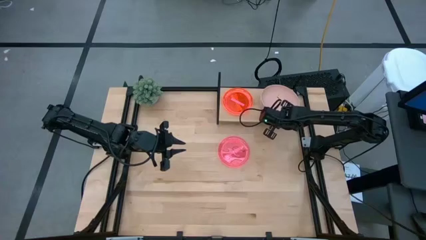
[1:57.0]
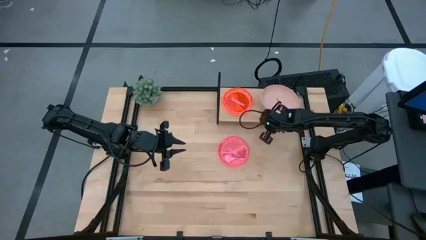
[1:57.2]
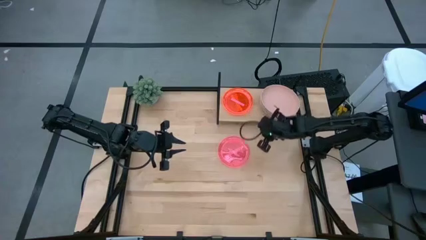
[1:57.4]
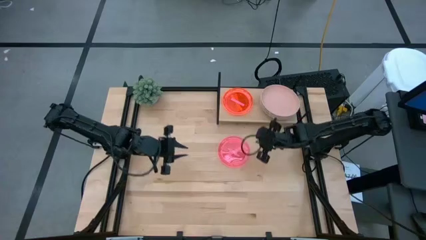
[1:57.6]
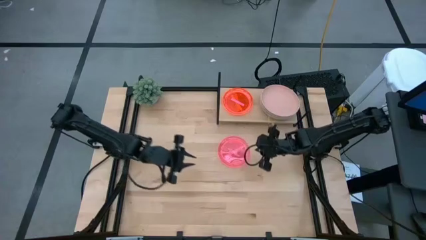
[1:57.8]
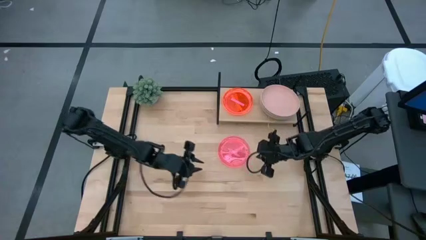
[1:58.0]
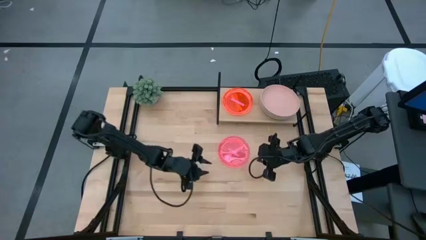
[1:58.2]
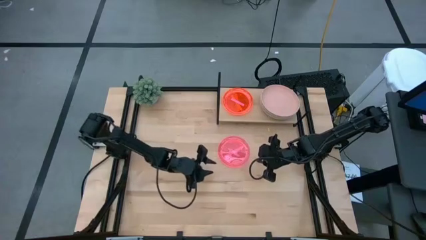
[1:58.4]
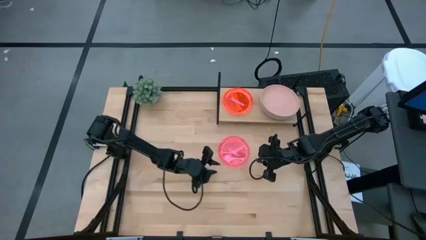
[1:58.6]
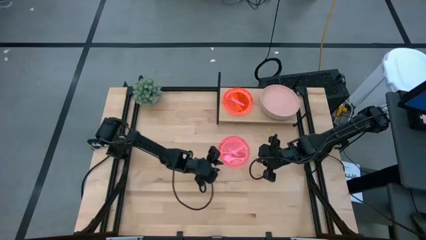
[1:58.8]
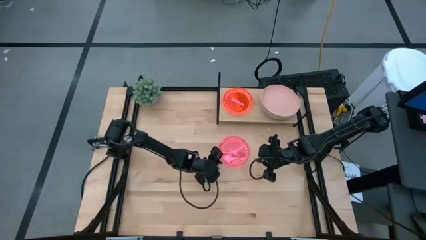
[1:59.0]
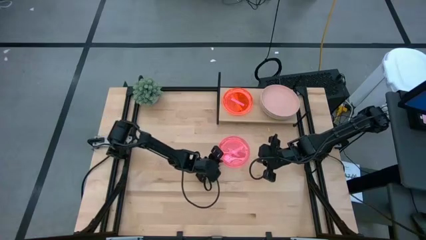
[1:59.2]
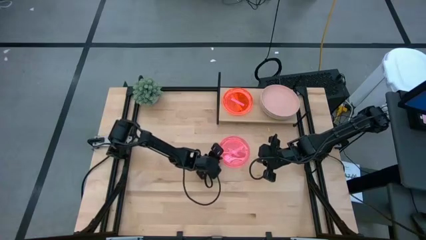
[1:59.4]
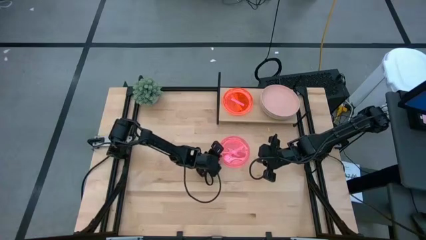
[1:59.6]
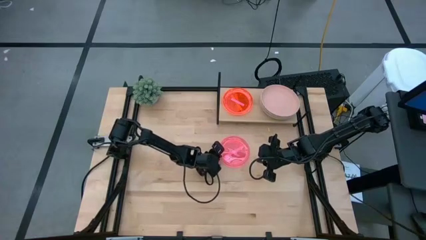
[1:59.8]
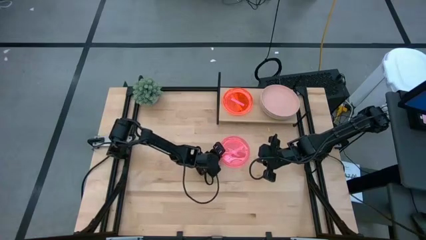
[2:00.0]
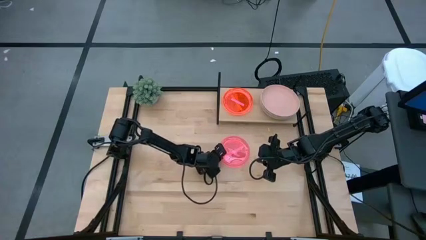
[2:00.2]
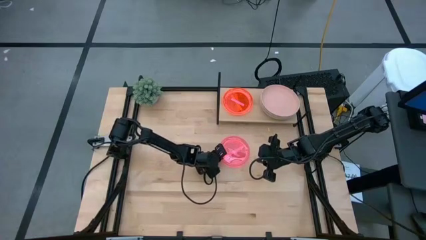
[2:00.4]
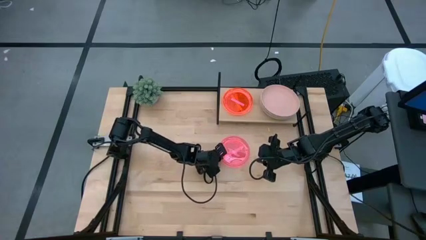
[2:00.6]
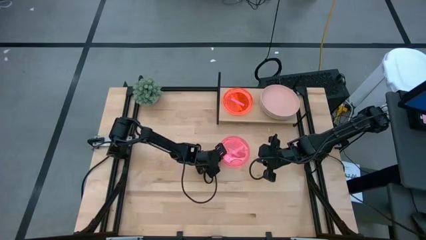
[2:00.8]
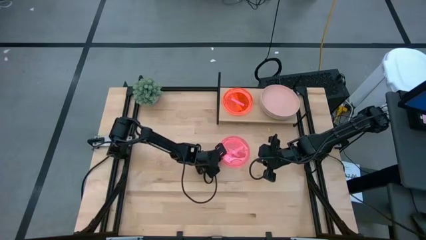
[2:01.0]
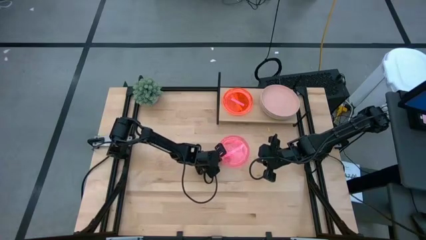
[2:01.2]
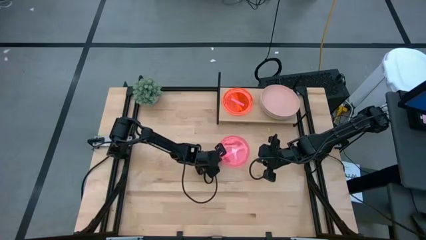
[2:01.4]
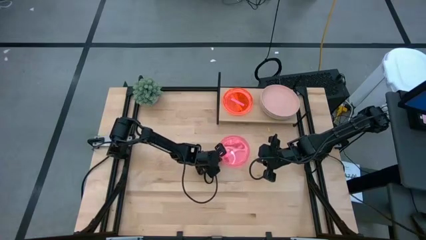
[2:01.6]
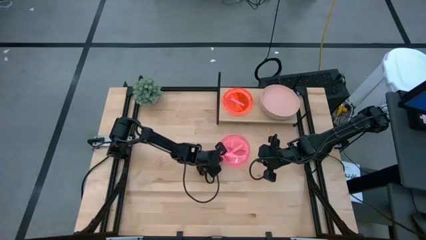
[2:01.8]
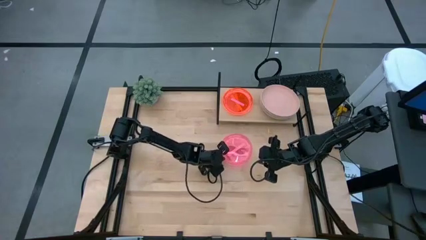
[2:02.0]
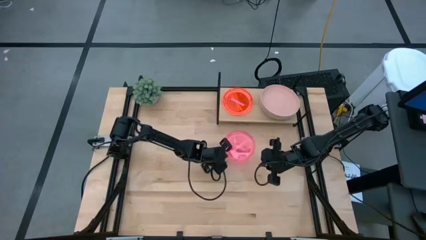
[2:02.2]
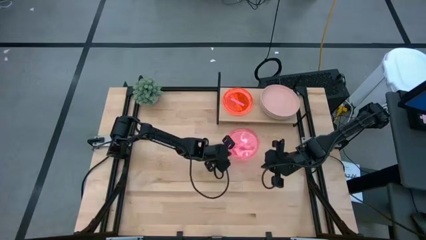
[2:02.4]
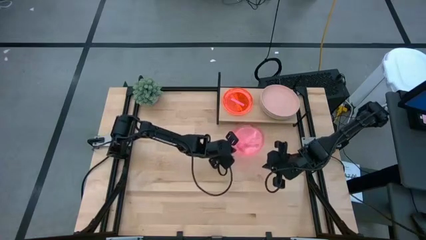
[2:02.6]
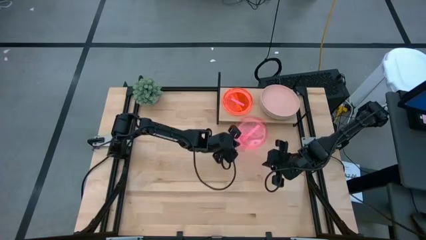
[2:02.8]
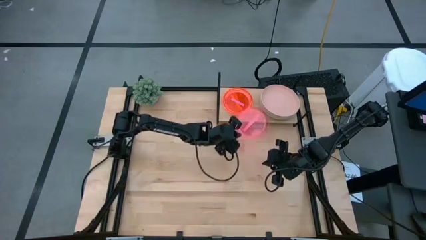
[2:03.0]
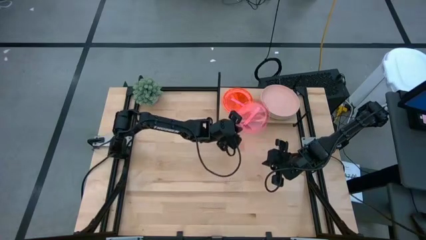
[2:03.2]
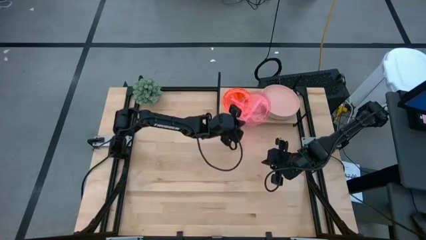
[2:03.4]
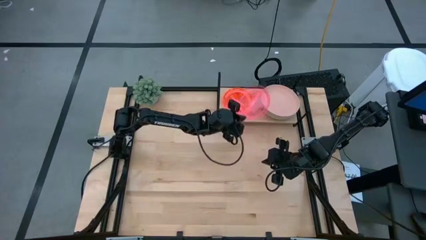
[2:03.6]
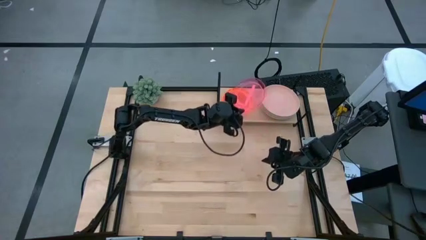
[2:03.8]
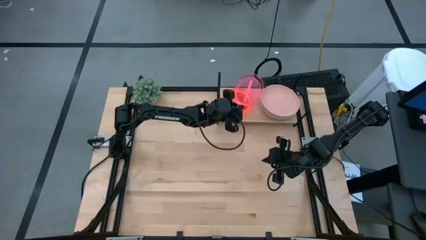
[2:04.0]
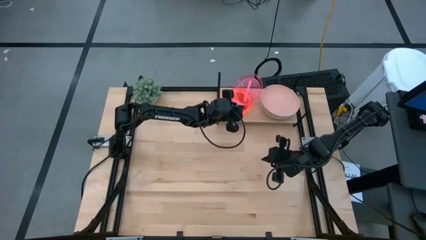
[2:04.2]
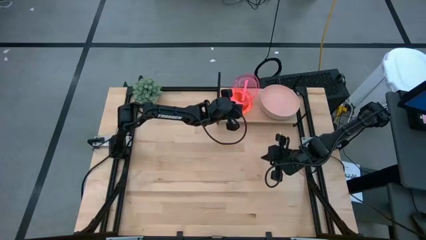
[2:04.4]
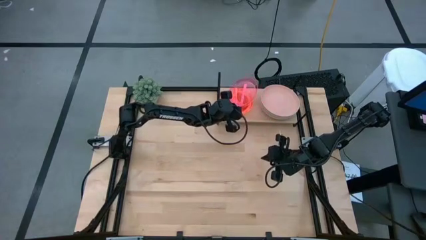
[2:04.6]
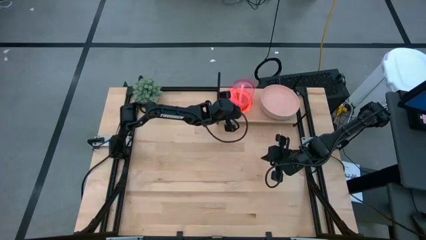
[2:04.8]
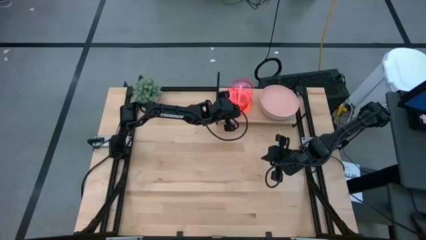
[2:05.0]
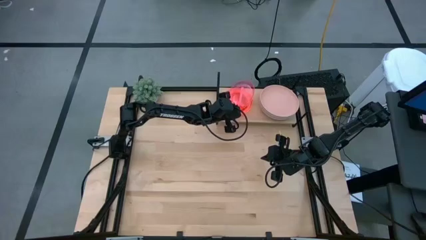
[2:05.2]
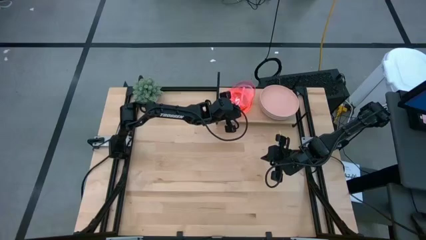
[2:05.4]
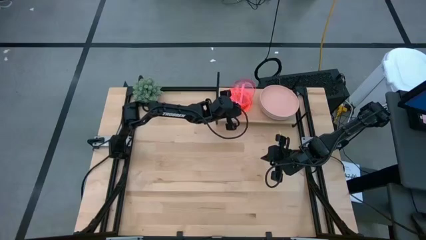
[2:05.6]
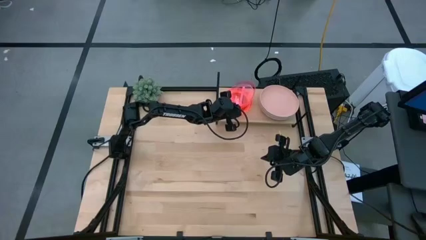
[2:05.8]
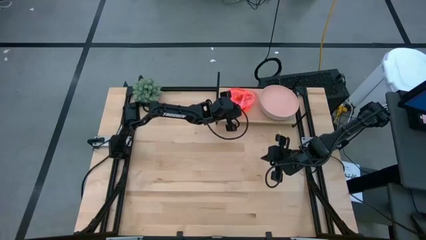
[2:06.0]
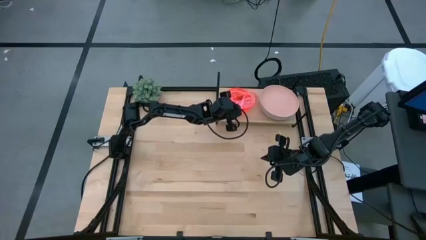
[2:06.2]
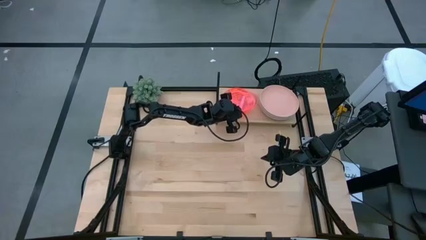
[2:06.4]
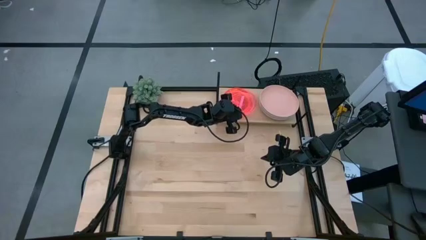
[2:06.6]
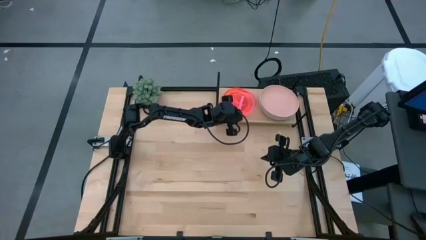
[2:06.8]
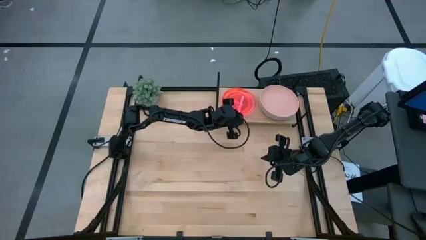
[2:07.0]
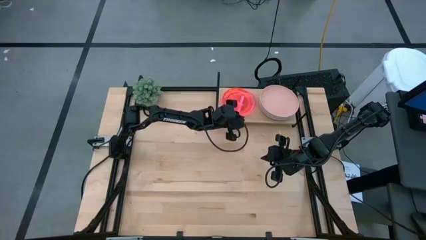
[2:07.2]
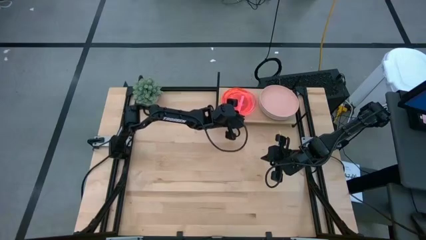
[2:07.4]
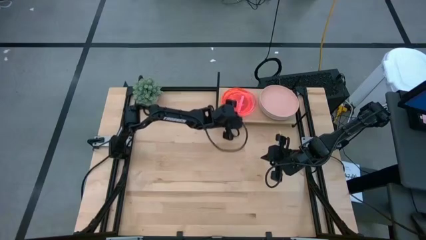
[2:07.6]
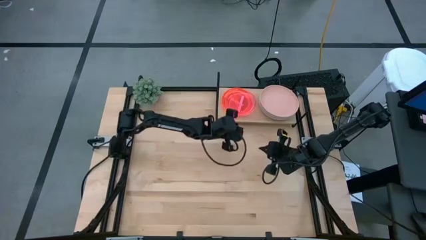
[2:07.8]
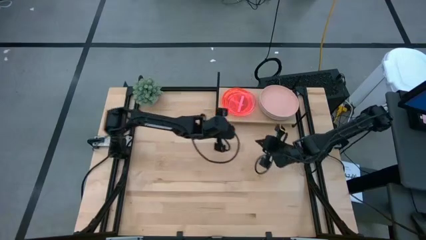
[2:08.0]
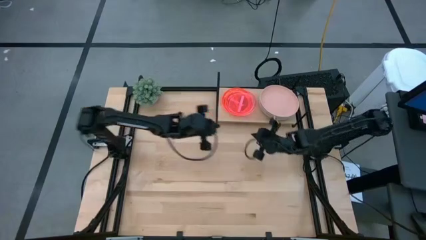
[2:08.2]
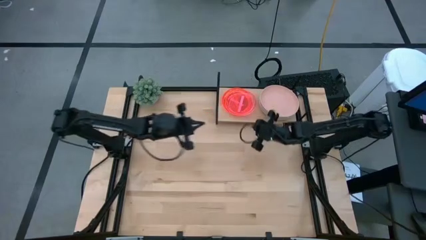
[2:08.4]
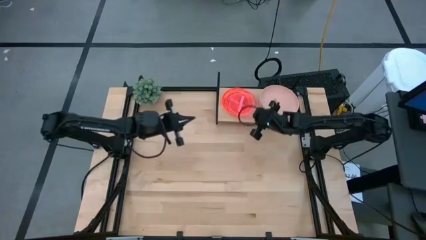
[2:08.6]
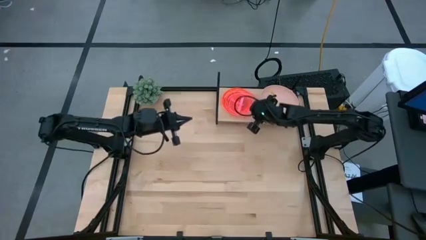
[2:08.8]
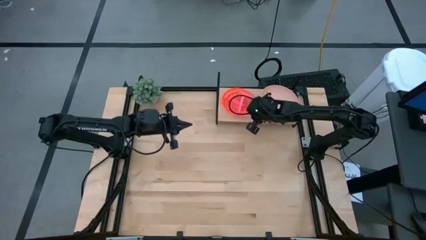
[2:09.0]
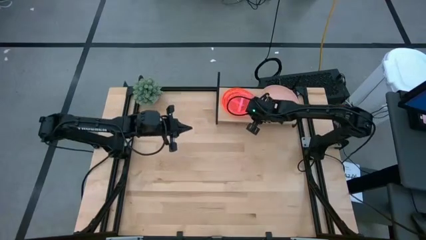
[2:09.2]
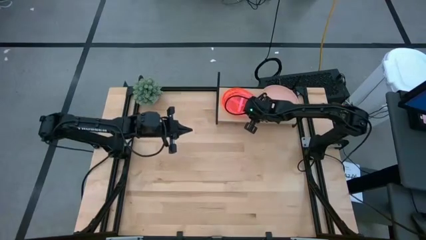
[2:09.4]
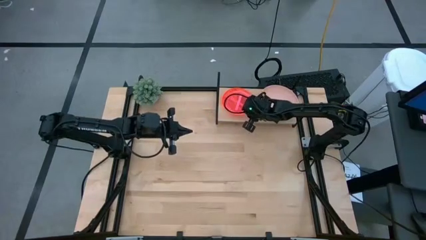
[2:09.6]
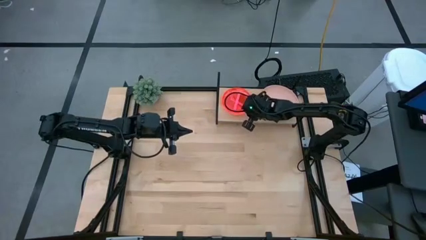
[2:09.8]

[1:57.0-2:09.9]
Task: Place and stack plates onto a shelf
Stack the pink plate on top of the pink plate on the shelf

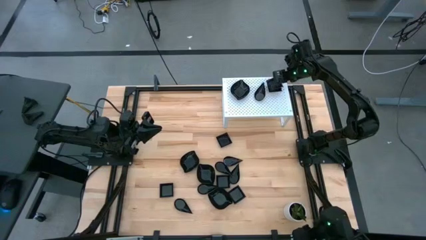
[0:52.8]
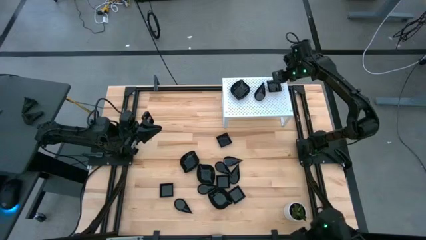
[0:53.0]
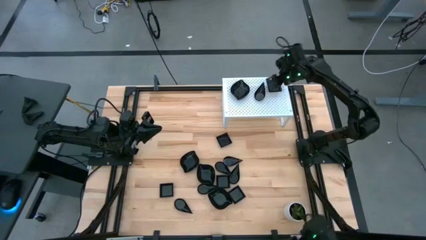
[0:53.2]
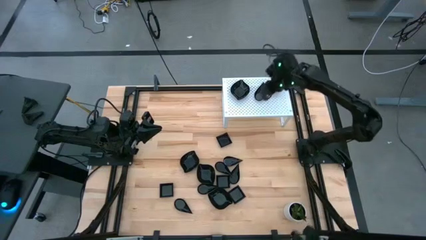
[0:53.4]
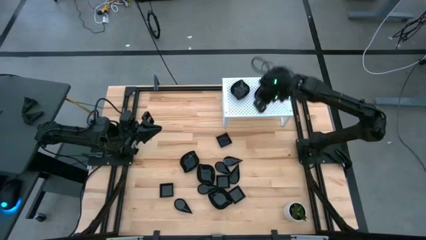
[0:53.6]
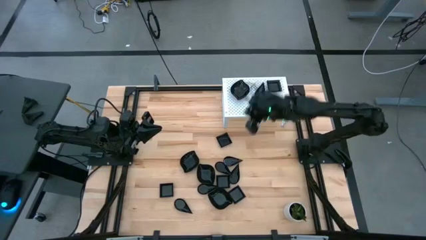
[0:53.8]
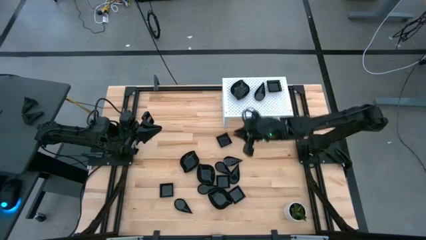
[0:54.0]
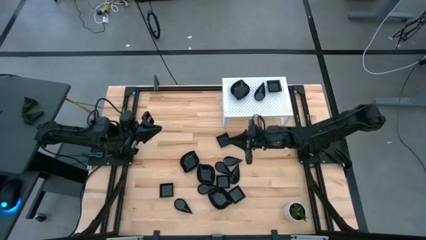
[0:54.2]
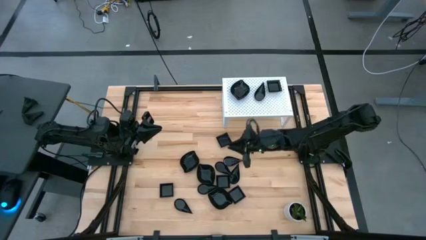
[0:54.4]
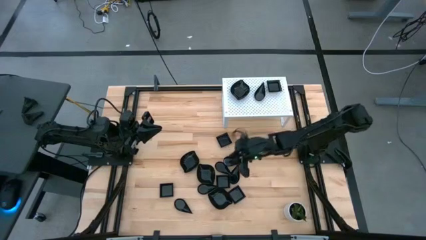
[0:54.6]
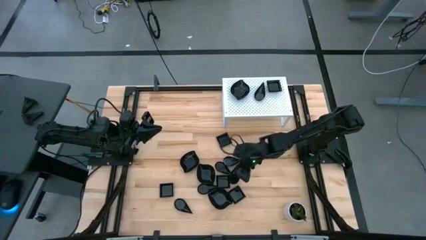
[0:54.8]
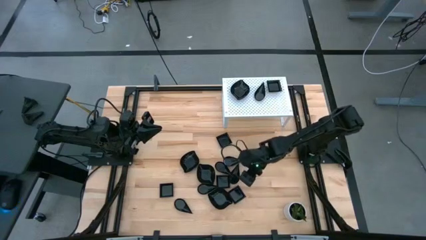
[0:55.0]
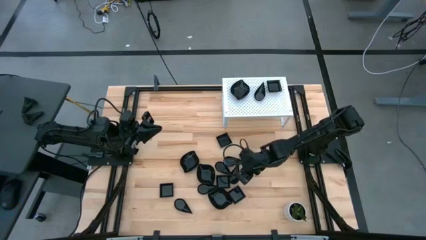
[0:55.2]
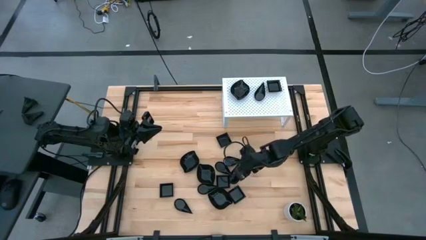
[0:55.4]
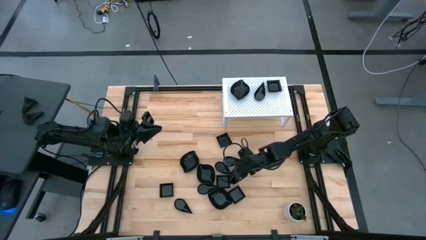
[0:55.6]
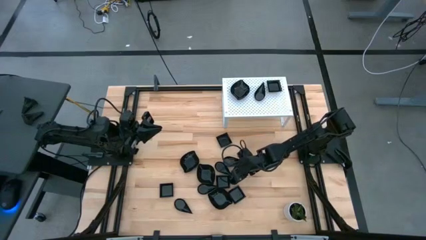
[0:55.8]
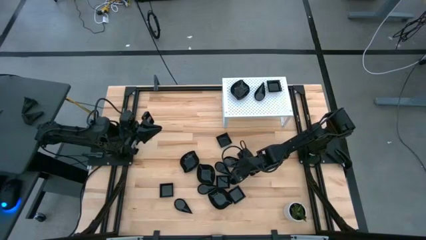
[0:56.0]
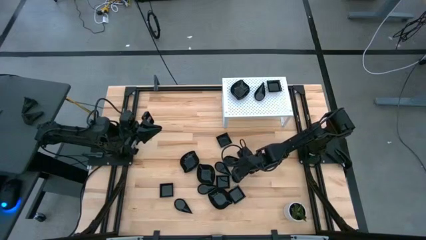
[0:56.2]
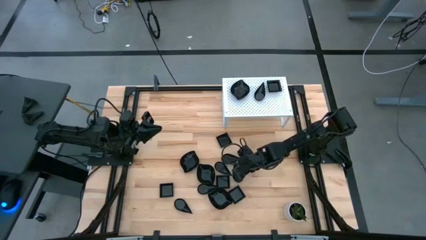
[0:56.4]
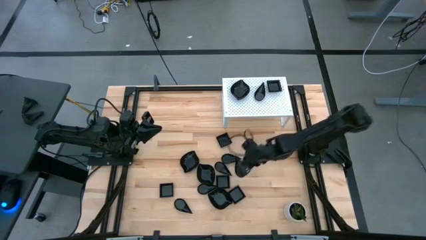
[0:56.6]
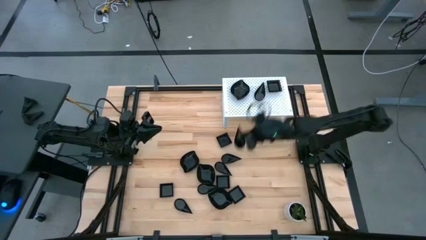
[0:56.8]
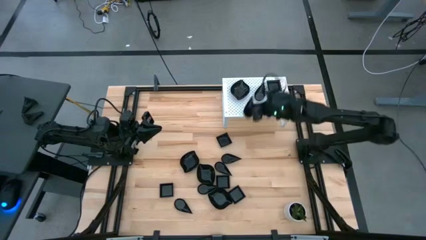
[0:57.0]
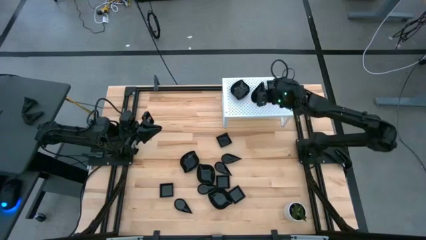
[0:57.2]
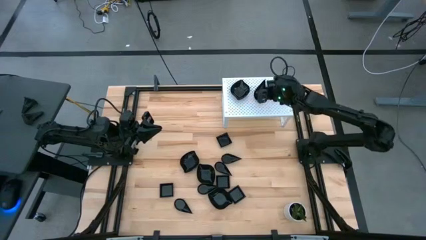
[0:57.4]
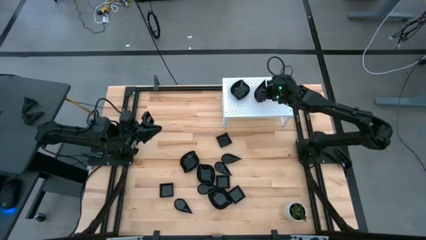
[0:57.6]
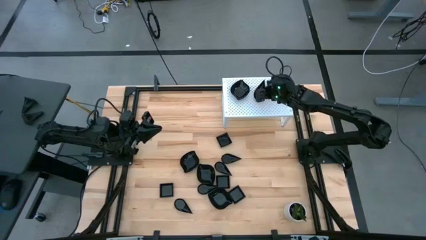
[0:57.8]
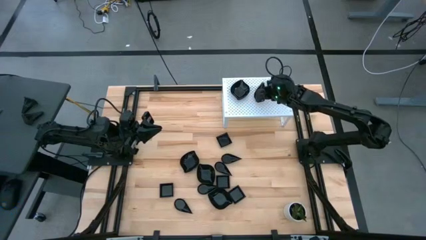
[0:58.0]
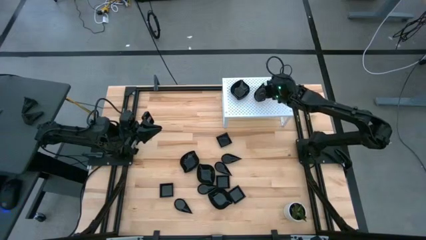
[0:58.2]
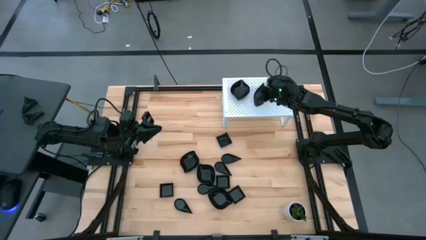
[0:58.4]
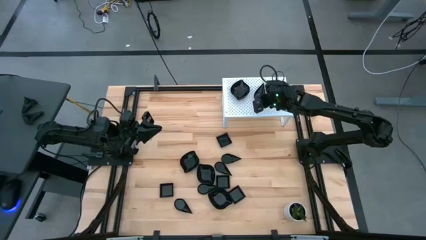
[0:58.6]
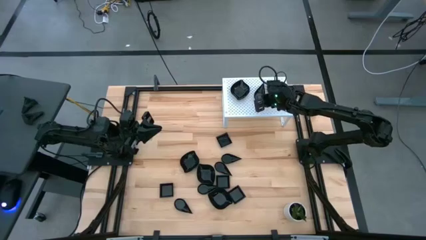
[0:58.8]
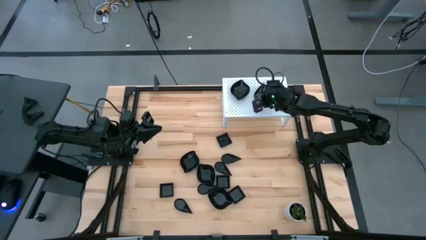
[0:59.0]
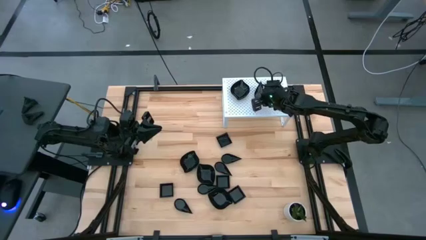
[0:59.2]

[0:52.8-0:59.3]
Task: Pick & Place Mini shaped plates
Stack the drop shaped plate on top of the drop shaped plates on the shelf
